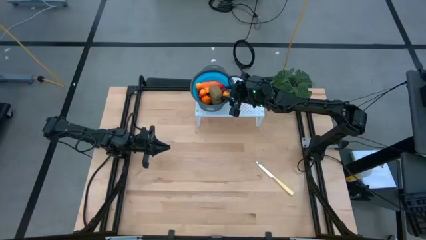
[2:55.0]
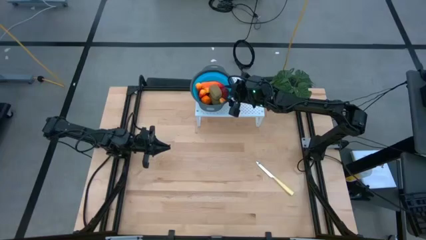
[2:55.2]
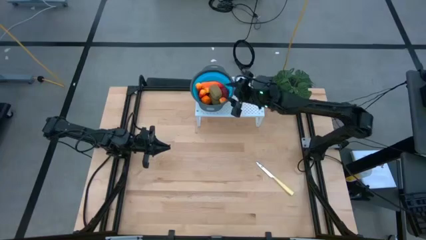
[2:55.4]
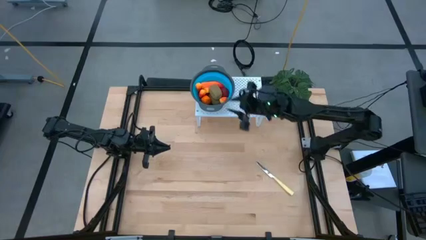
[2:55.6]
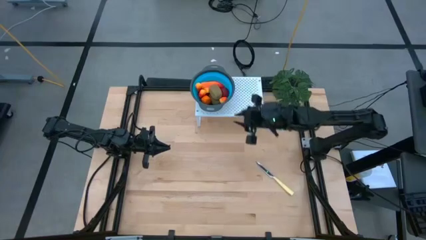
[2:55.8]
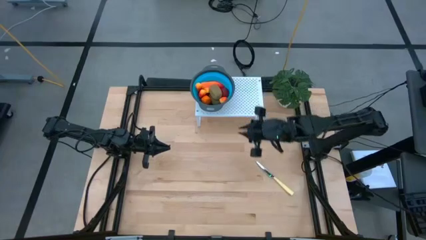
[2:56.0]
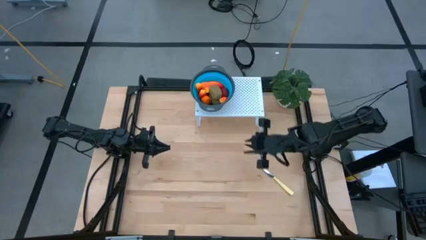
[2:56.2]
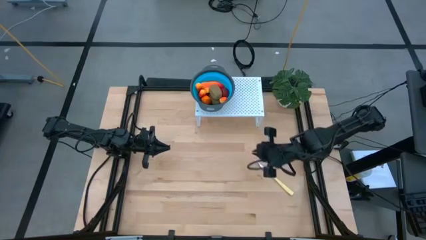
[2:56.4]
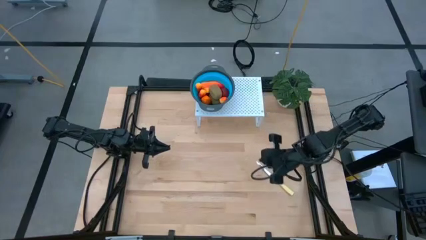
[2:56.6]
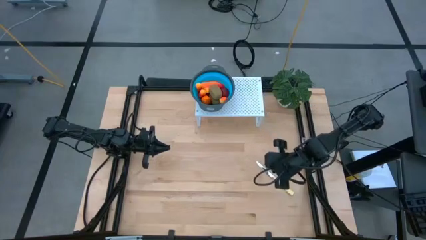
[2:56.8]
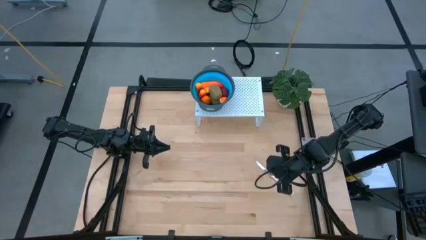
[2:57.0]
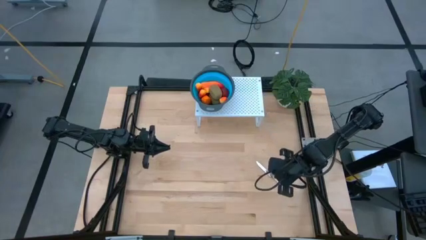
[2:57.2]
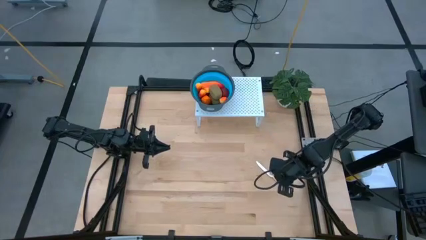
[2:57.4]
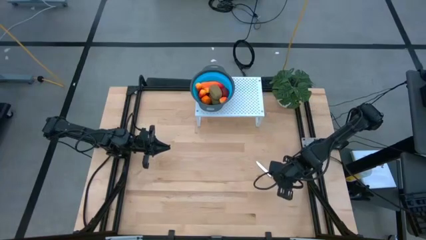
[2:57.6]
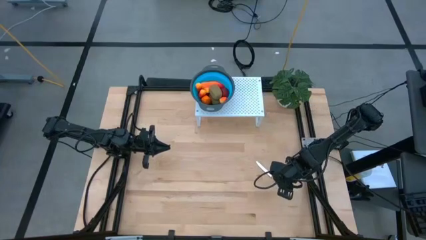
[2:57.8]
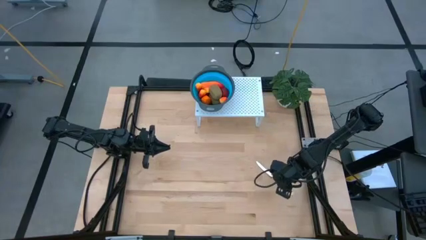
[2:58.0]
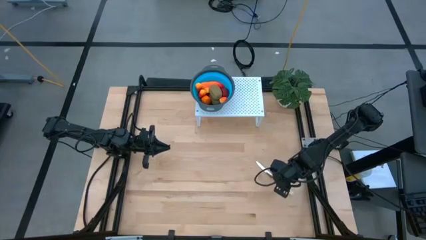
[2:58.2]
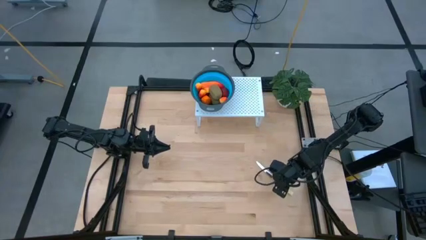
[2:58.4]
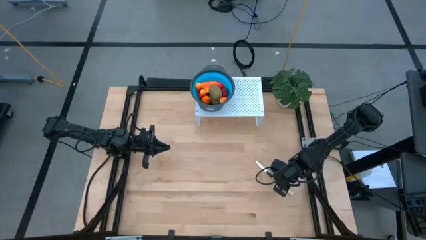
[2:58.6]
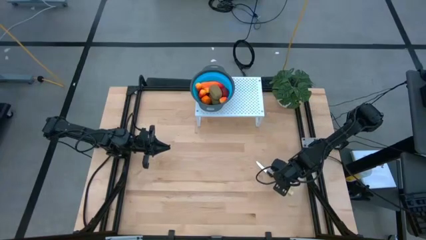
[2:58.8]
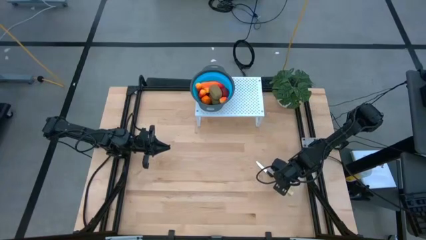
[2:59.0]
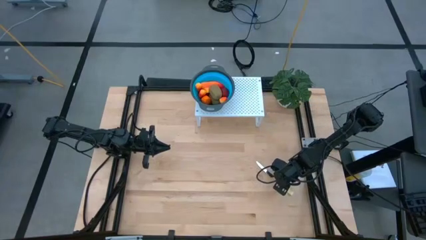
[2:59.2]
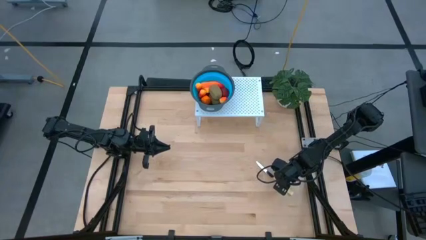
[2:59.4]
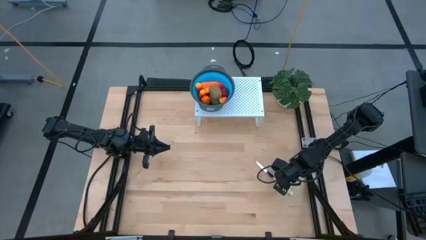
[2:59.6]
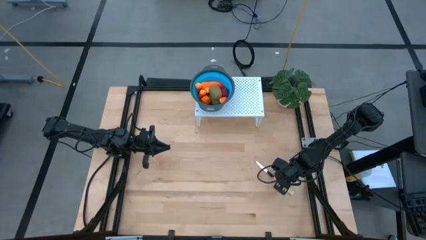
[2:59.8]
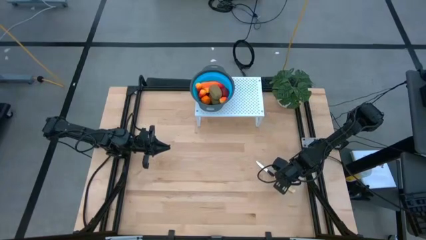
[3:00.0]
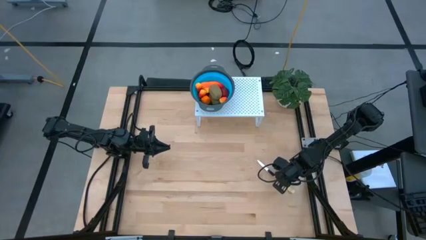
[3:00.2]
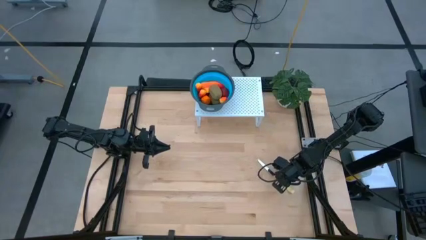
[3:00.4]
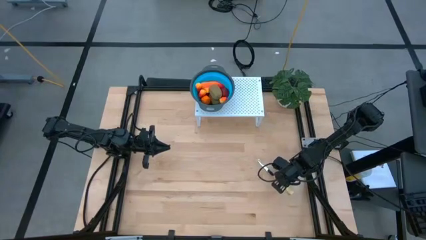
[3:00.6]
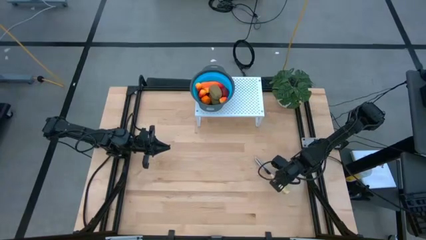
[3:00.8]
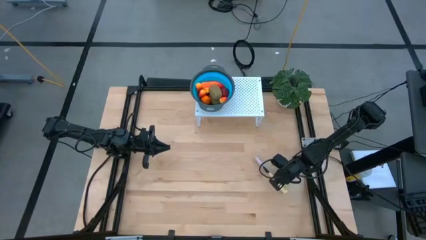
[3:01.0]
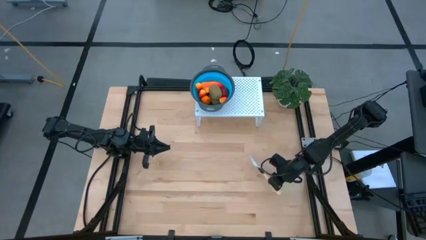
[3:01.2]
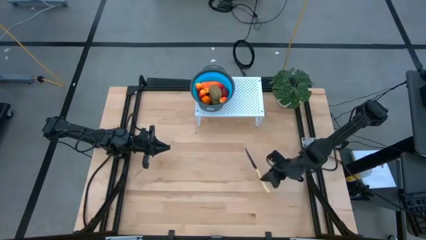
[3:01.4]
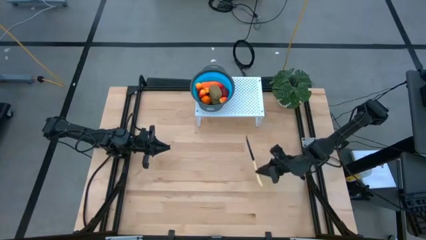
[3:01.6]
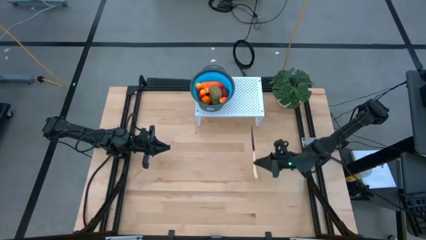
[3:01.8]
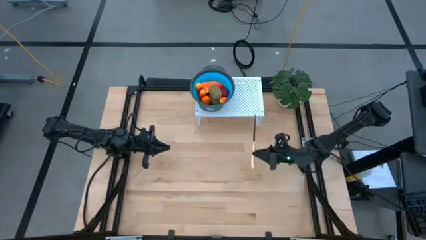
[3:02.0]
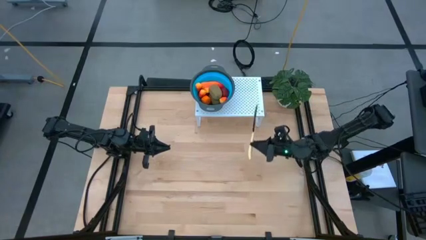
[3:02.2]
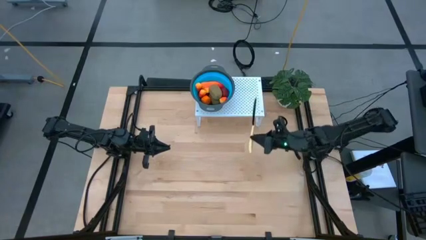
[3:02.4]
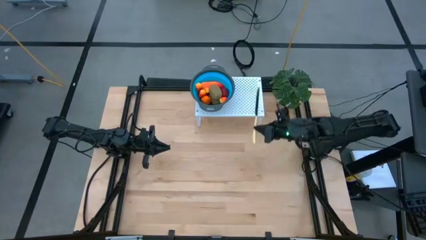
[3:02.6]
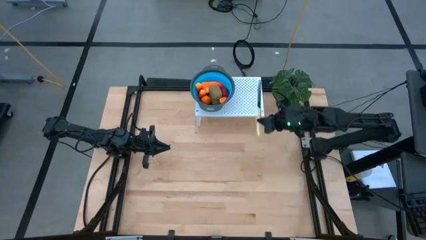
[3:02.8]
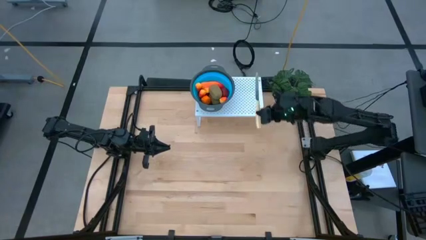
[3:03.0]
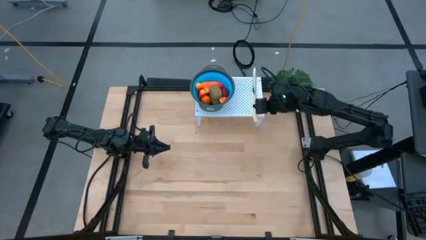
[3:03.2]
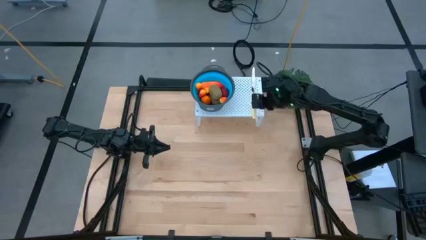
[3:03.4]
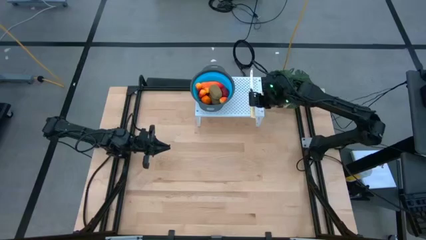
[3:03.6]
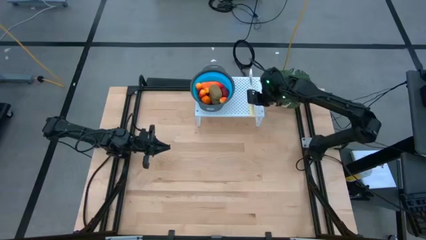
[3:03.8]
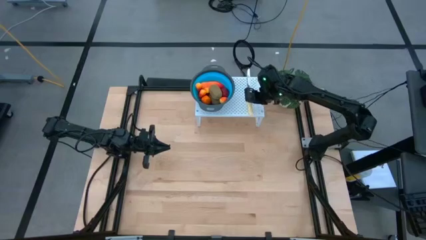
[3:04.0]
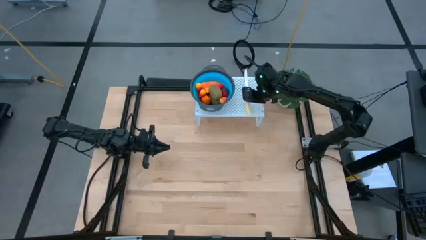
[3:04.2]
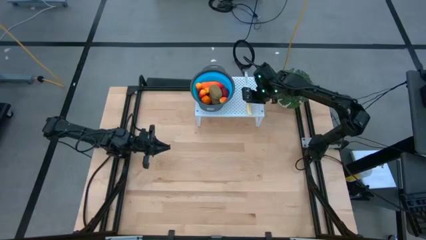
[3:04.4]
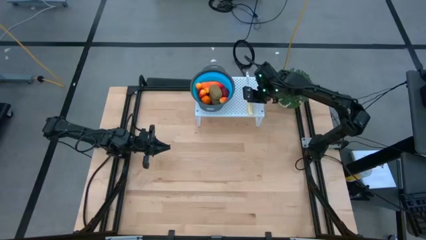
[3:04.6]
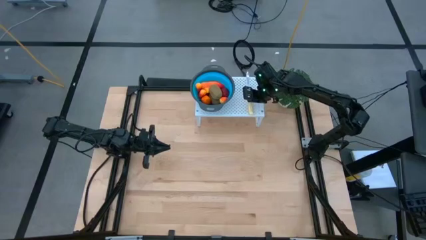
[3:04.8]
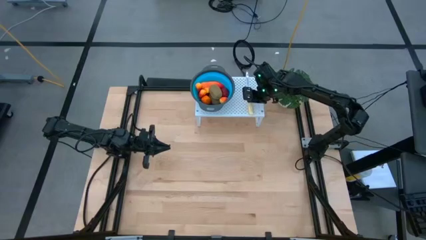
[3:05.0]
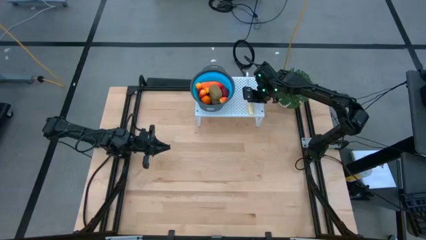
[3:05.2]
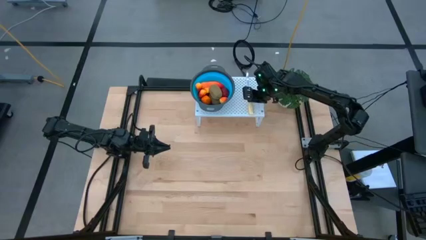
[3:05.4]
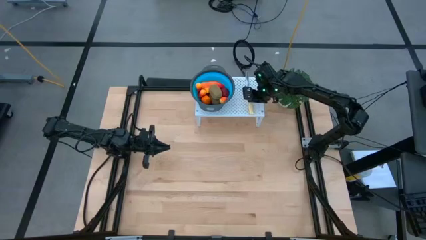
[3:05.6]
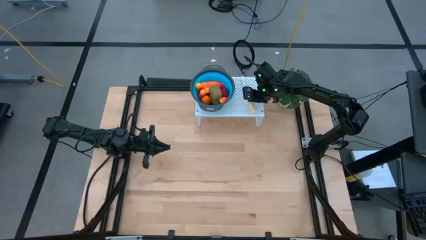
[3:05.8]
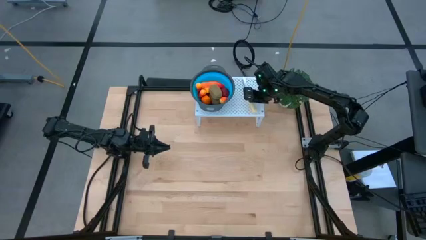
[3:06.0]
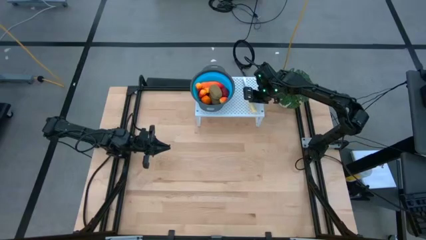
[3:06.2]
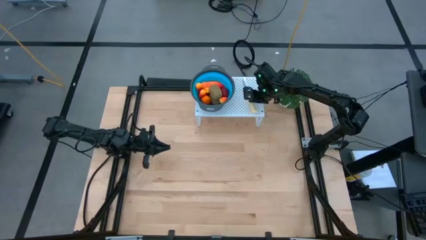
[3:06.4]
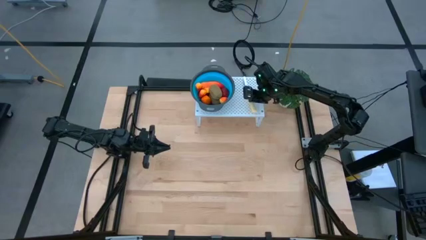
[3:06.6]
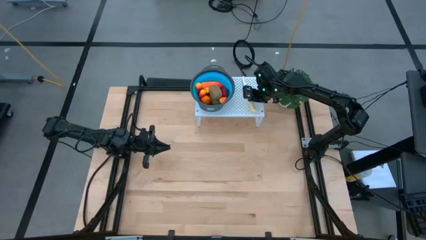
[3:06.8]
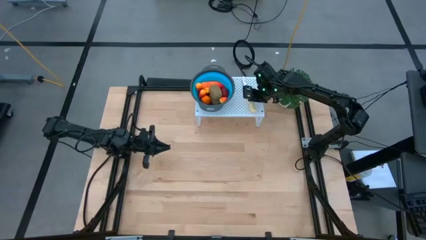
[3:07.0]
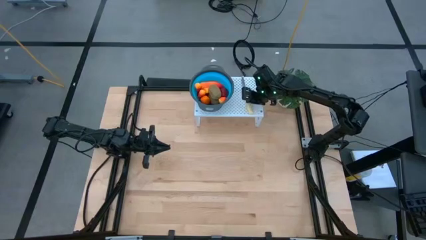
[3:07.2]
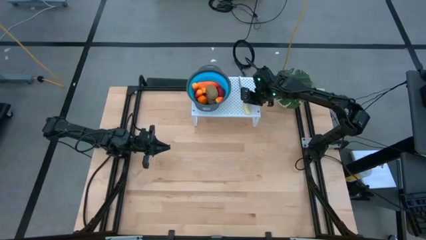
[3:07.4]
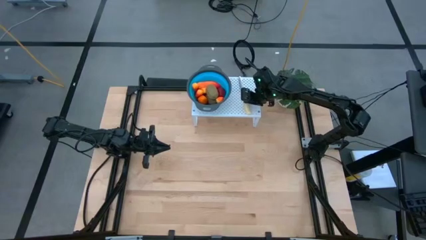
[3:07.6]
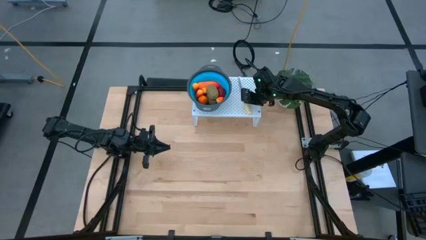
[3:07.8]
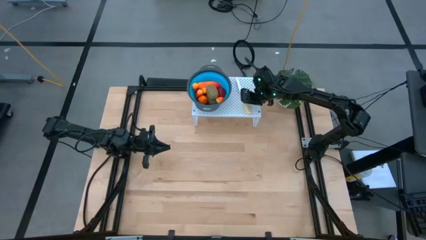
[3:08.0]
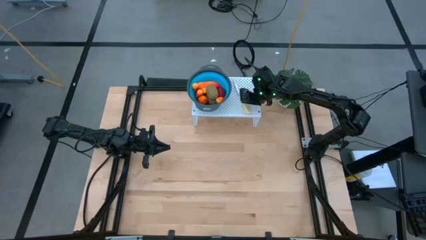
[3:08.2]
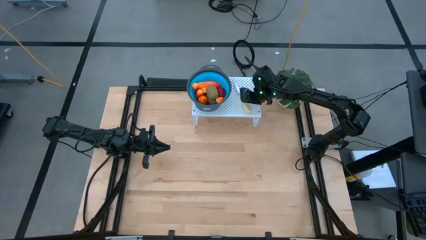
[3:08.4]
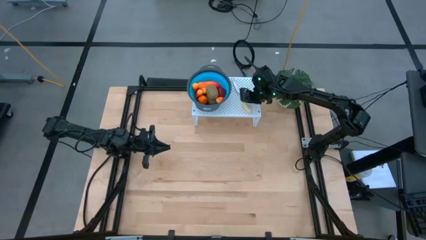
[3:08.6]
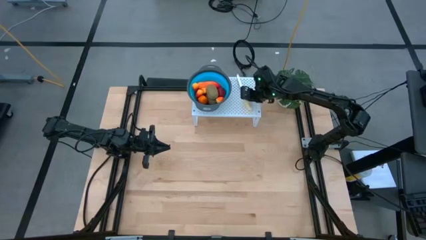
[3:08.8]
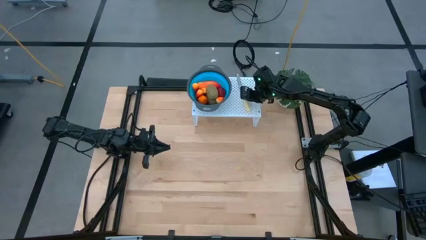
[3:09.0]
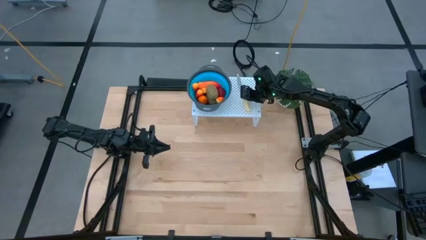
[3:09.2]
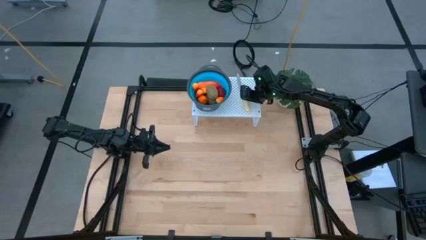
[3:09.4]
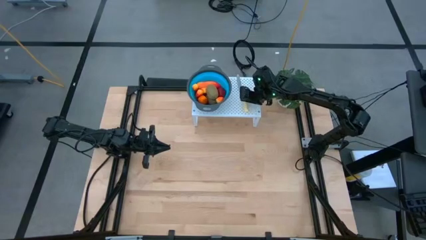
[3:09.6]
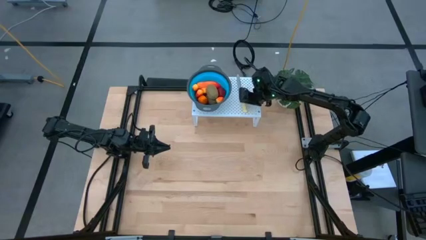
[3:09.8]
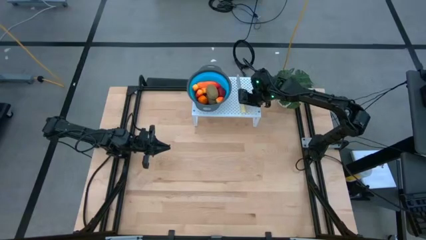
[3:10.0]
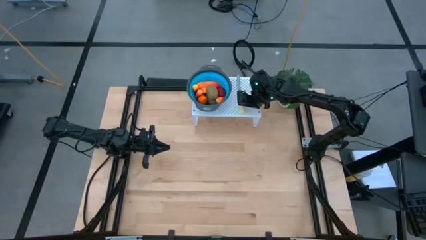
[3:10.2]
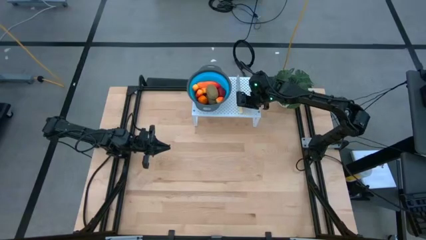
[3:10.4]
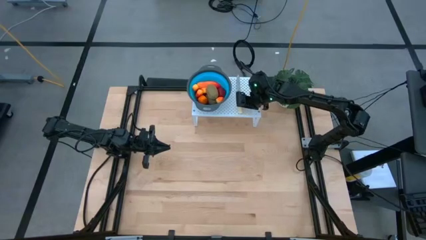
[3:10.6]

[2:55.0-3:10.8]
Task: Pick & Place Fruit
Put the knife on the shelf

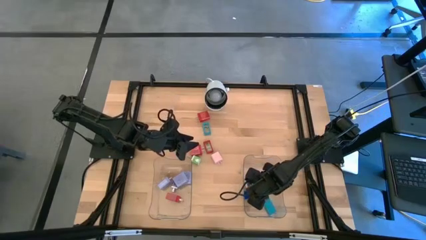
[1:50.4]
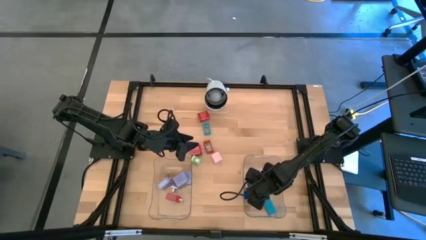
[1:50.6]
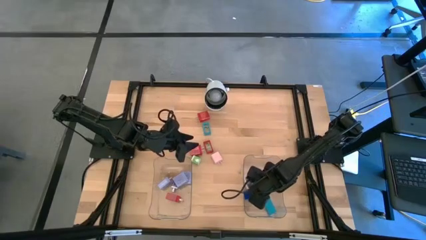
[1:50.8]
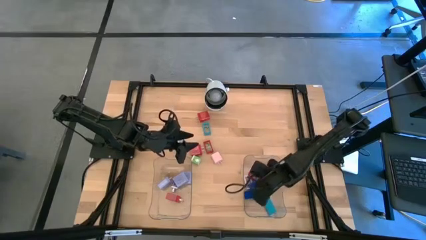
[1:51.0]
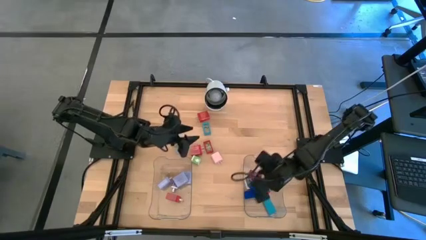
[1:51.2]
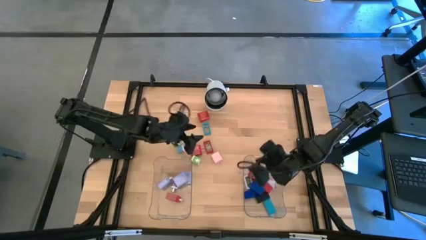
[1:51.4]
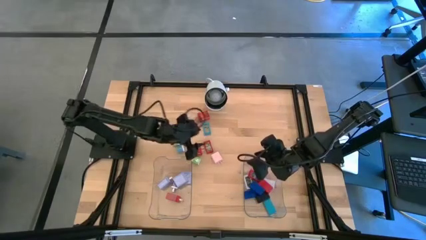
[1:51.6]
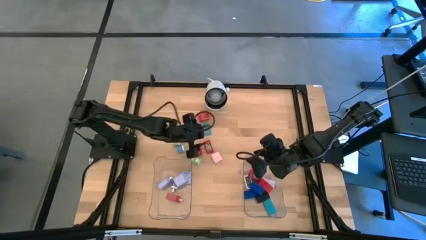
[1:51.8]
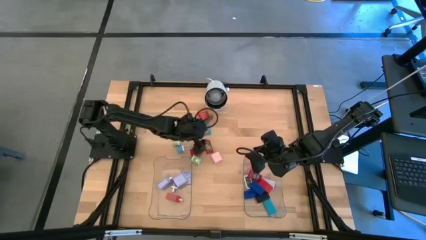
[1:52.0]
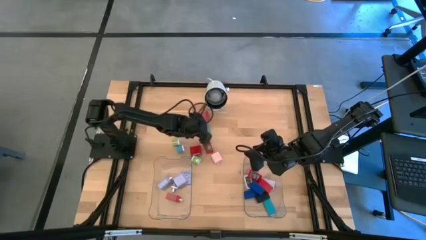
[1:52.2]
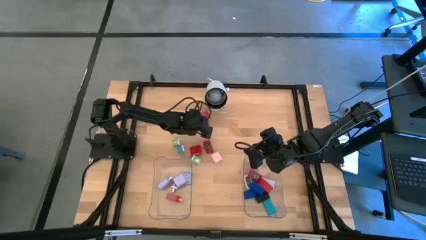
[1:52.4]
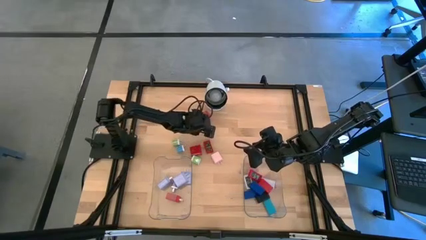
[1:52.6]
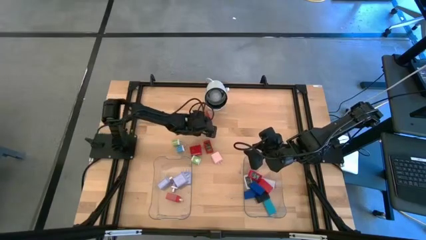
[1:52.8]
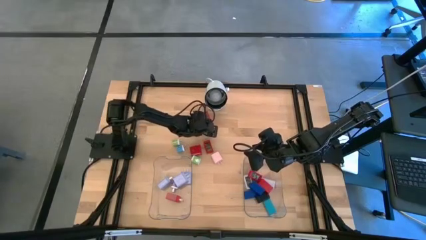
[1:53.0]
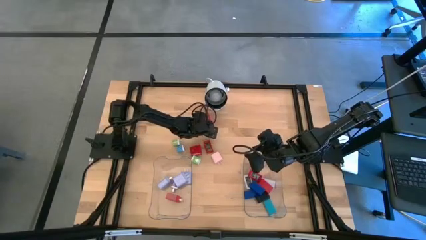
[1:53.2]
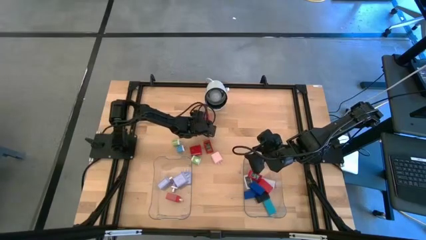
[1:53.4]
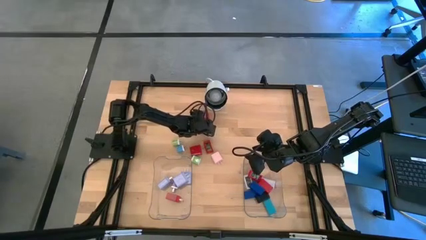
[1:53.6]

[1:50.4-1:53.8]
Task: Pick & Place Office items
Put the light blue timer into the right transparent bin
